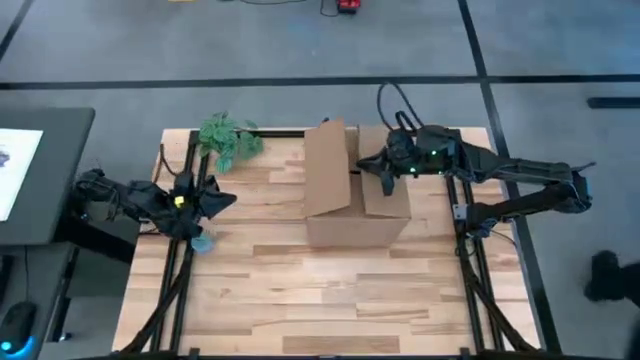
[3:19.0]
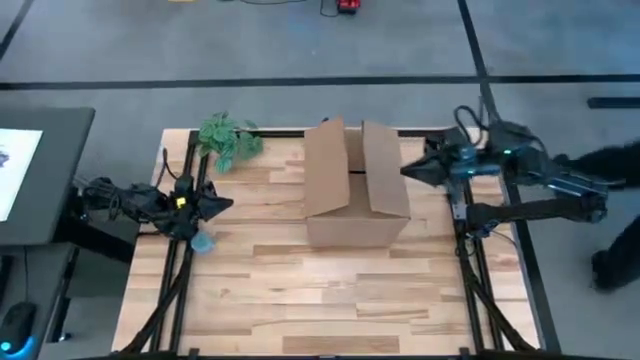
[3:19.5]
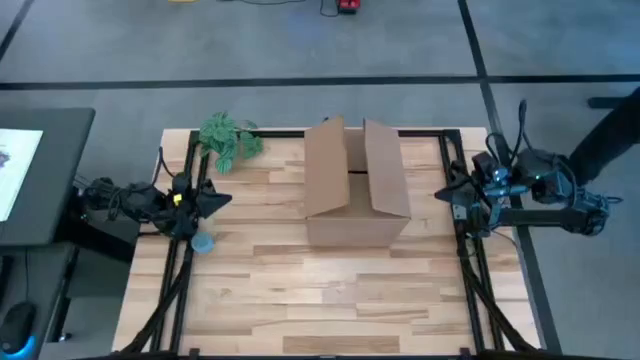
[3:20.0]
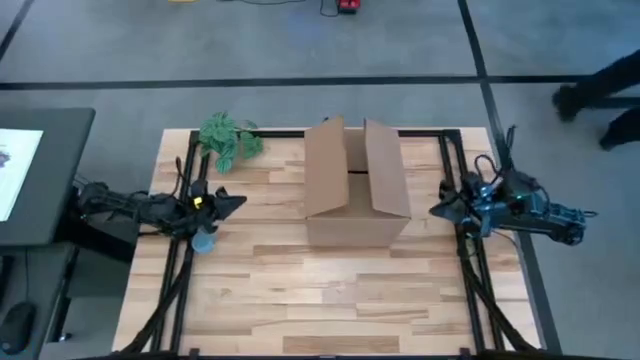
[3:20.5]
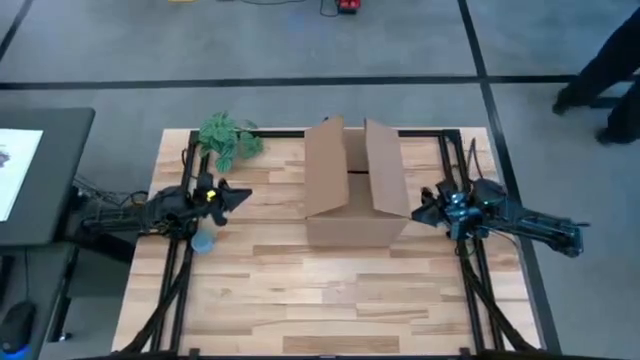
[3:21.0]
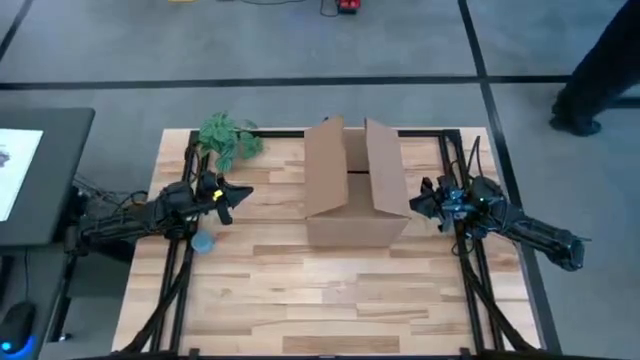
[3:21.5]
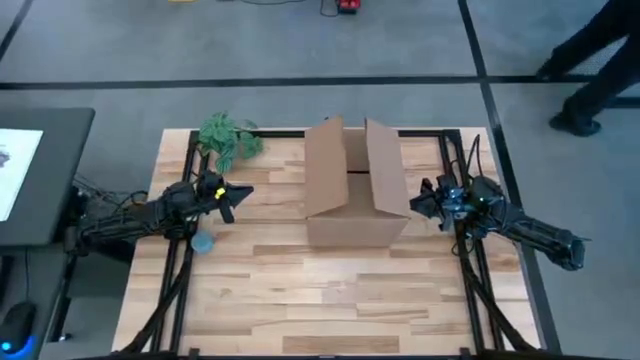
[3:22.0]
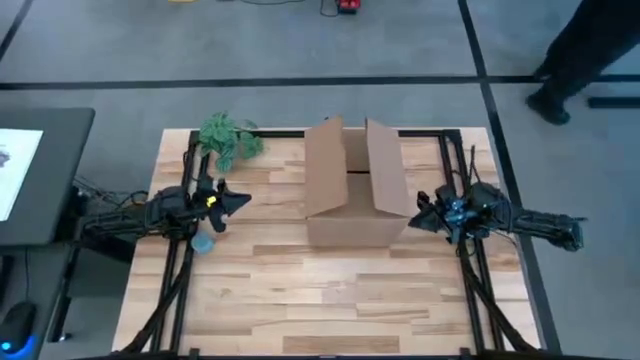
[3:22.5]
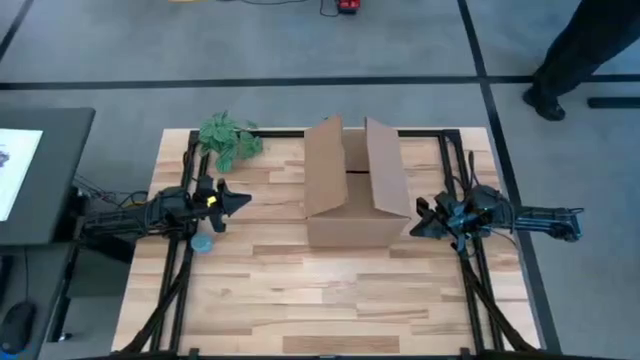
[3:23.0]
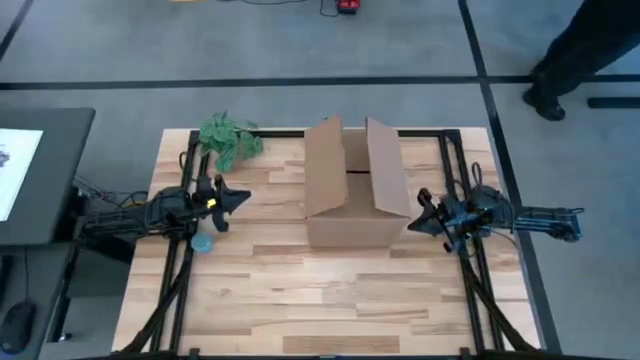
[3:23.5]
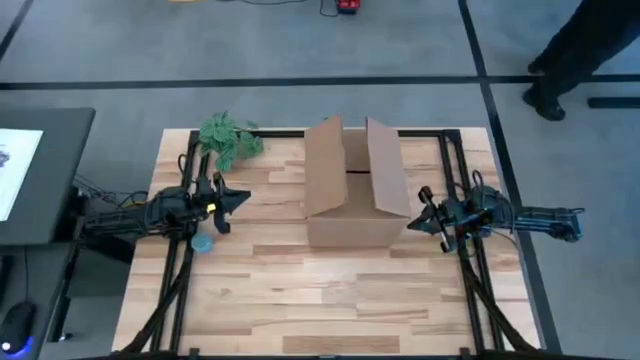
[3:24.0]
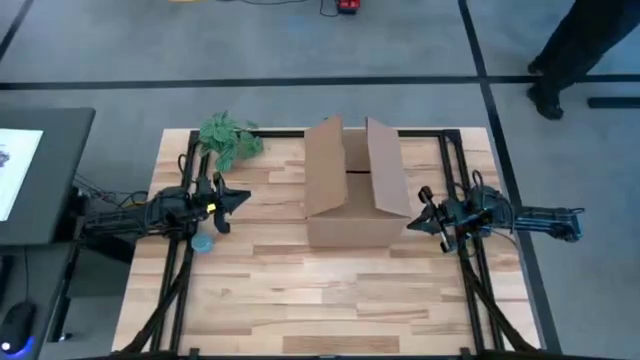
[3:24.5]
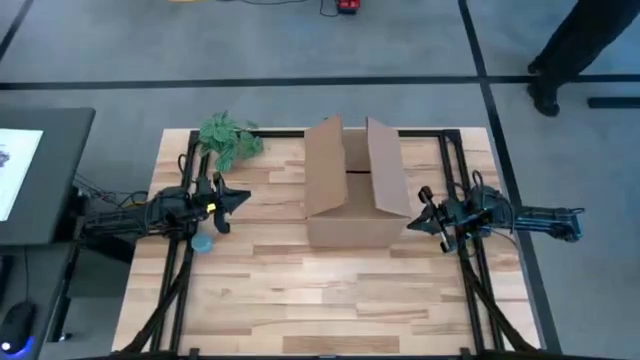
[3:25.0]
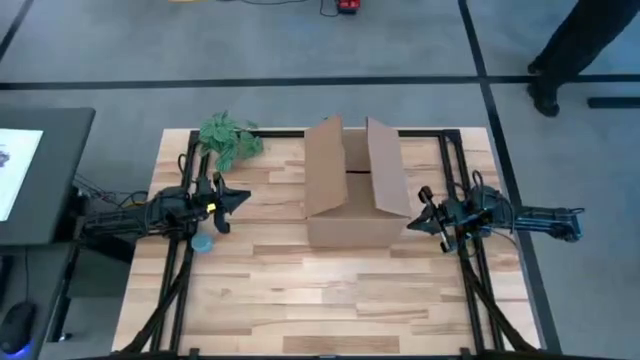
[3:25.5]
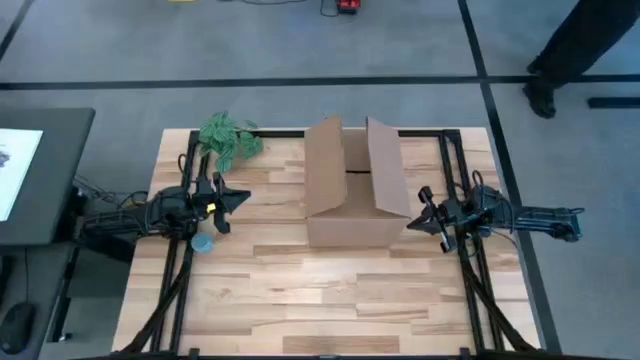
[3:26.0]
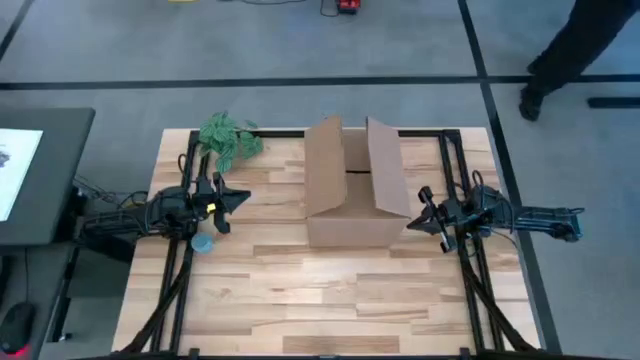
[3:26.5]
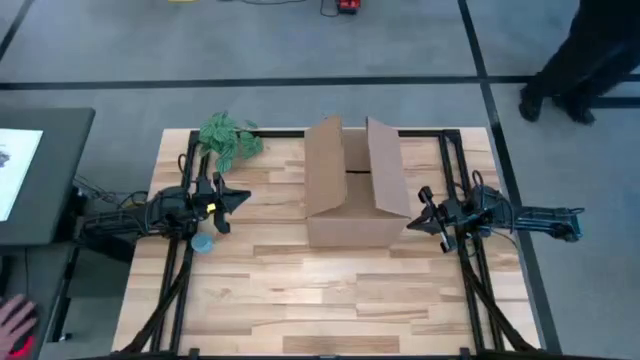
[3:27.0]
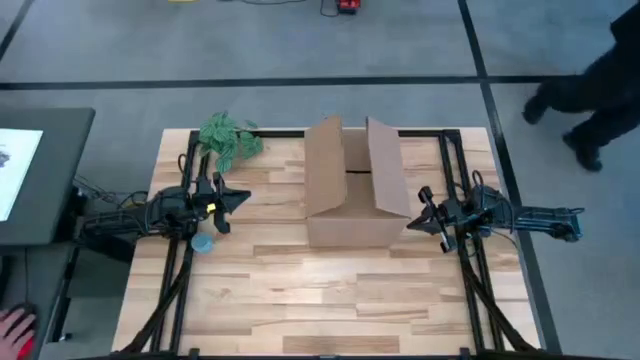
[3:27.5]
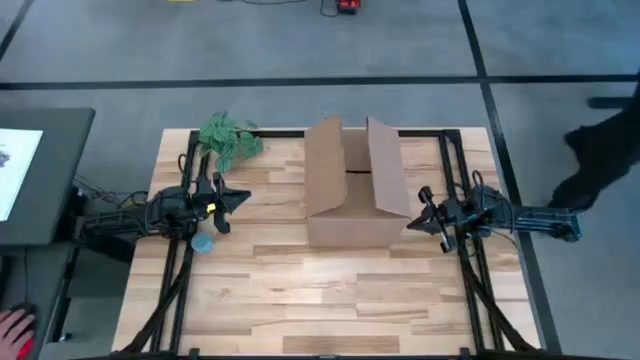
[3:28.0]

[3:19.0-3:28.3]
Task: wrap mug
Return to Home Position

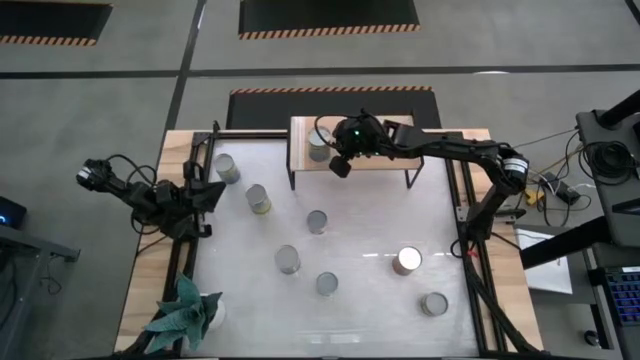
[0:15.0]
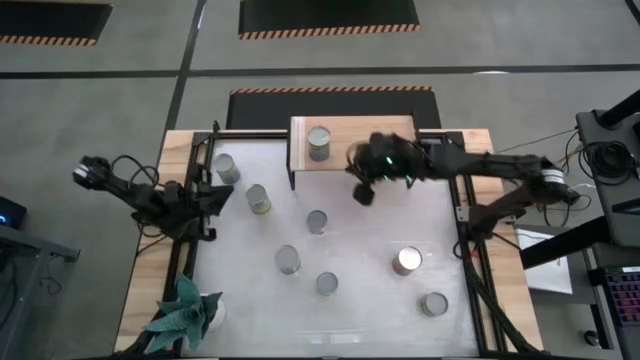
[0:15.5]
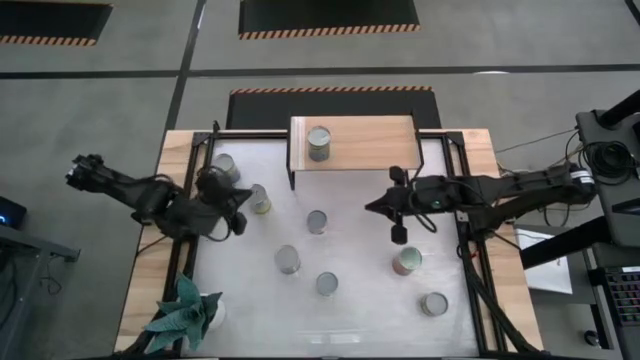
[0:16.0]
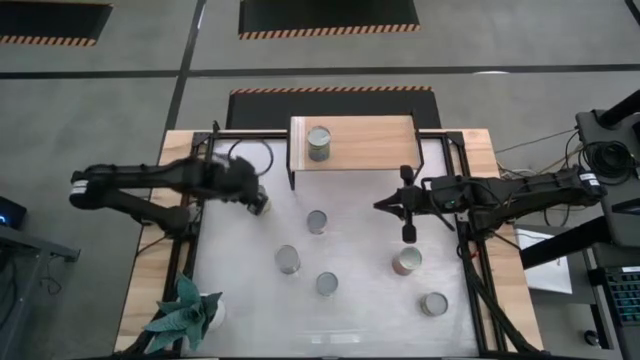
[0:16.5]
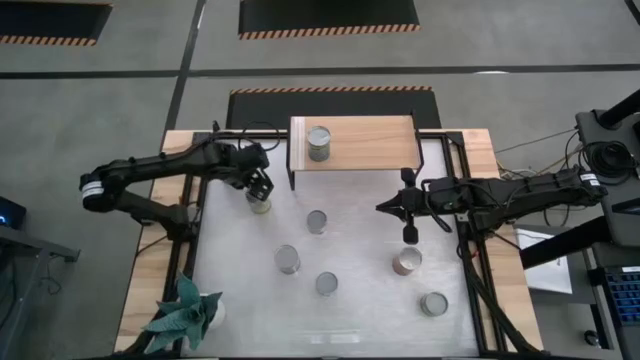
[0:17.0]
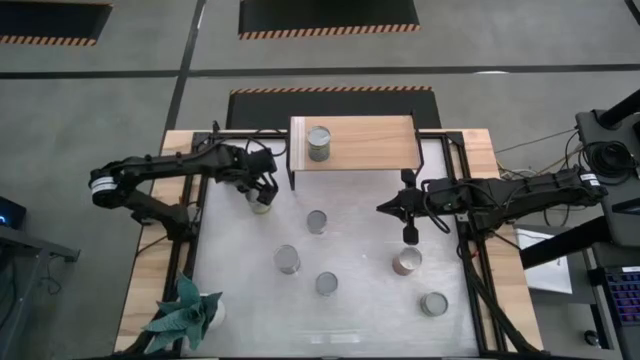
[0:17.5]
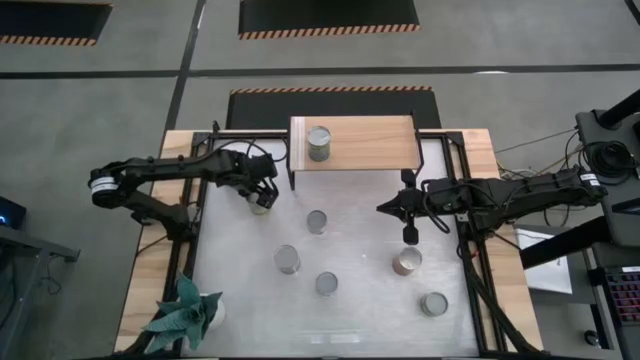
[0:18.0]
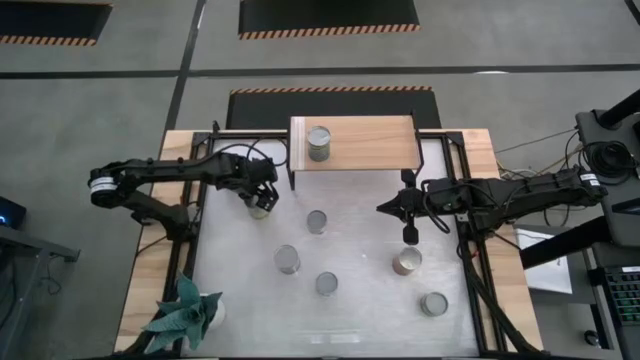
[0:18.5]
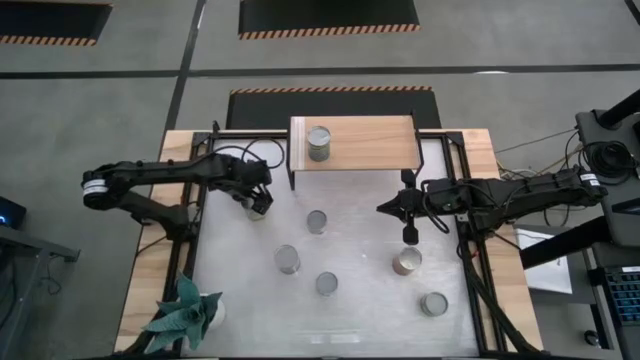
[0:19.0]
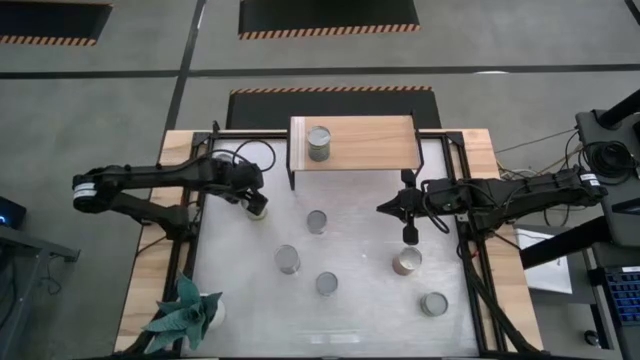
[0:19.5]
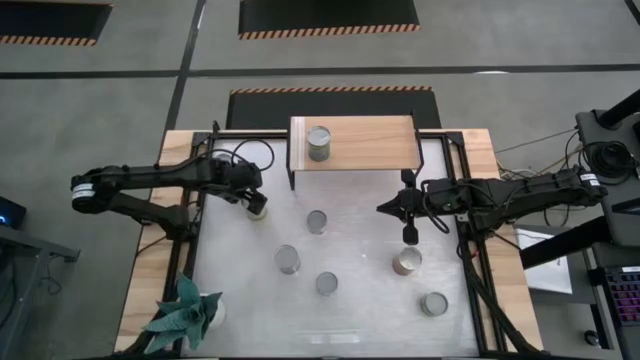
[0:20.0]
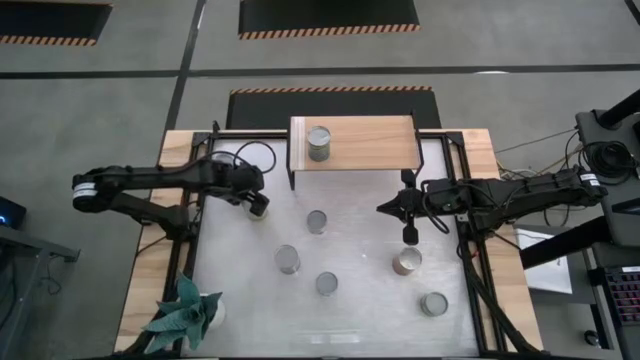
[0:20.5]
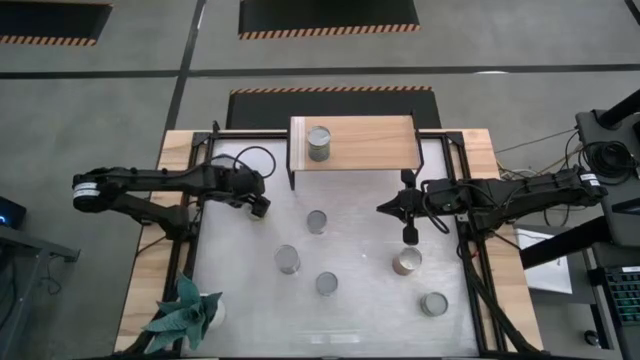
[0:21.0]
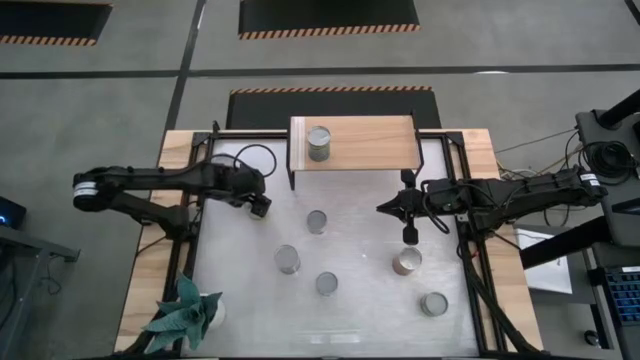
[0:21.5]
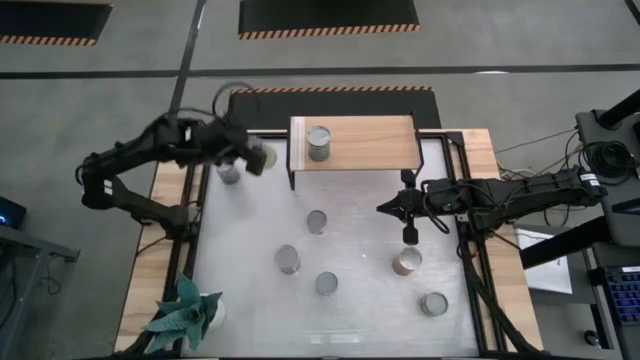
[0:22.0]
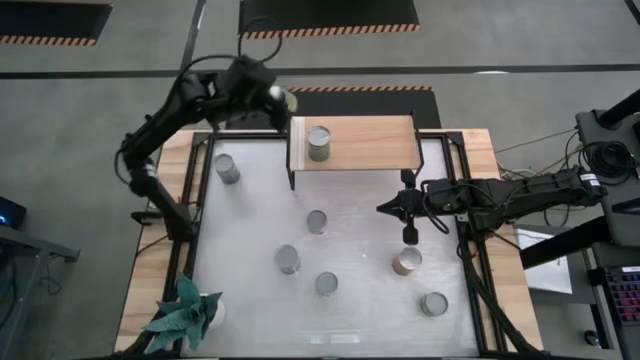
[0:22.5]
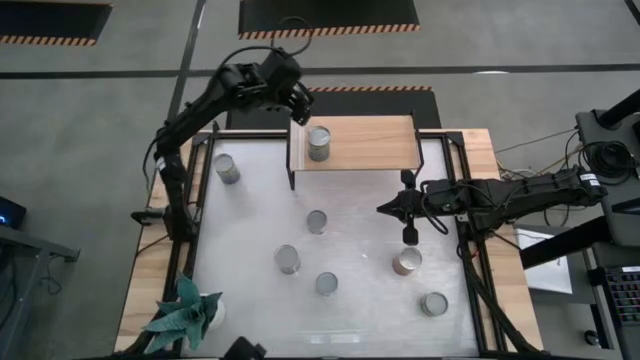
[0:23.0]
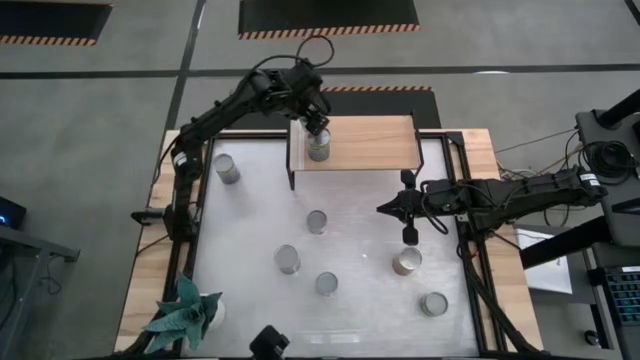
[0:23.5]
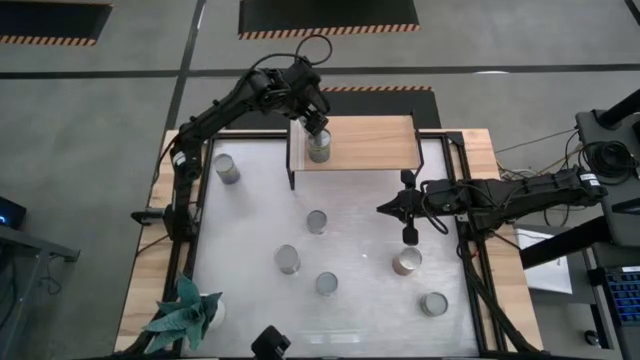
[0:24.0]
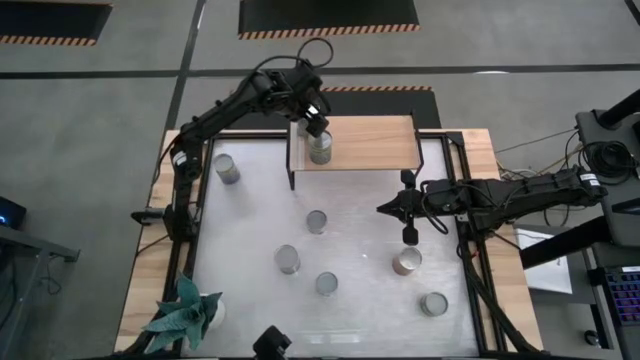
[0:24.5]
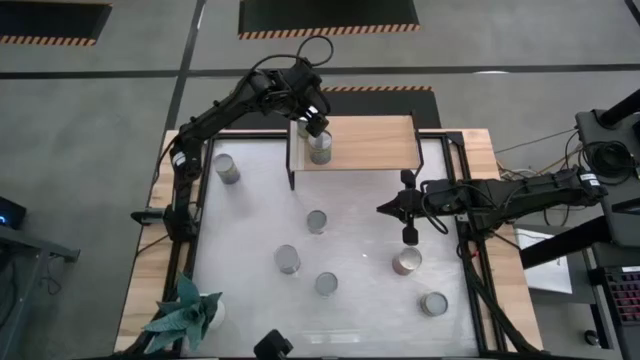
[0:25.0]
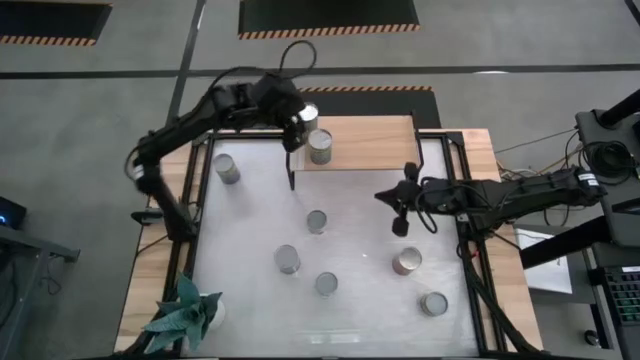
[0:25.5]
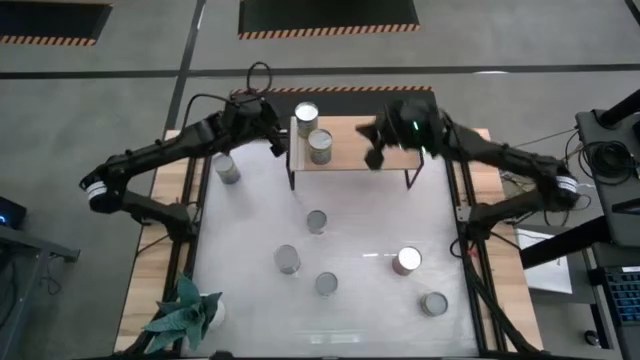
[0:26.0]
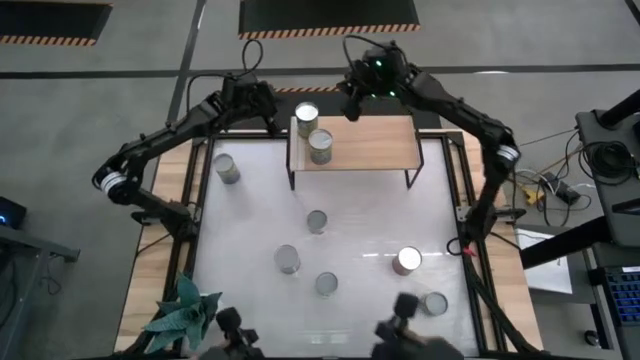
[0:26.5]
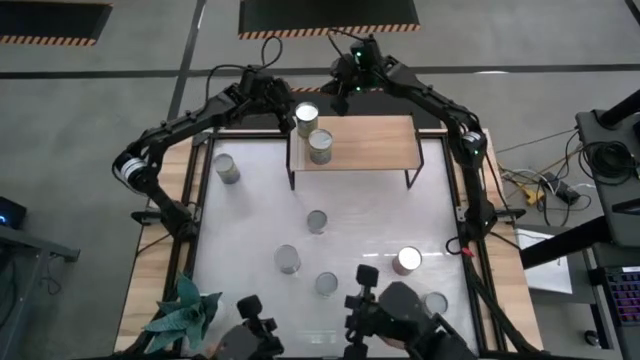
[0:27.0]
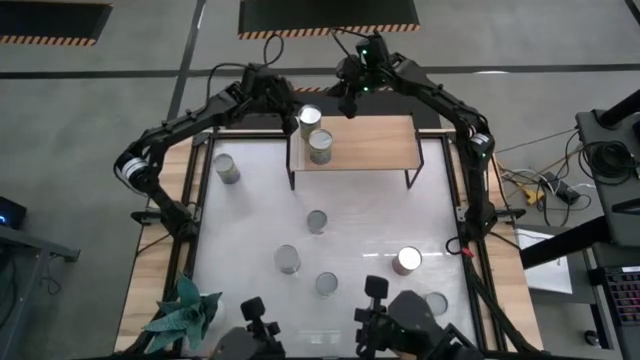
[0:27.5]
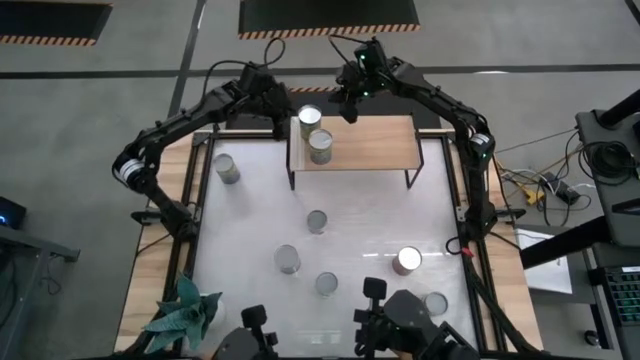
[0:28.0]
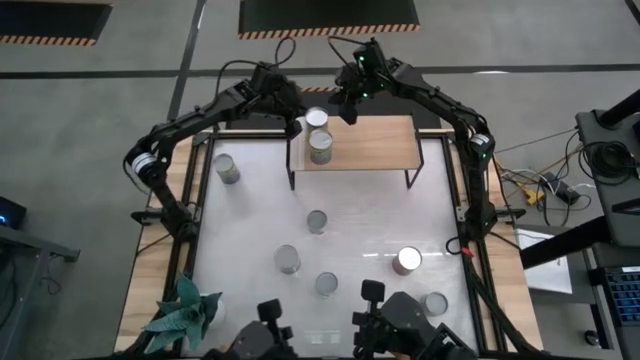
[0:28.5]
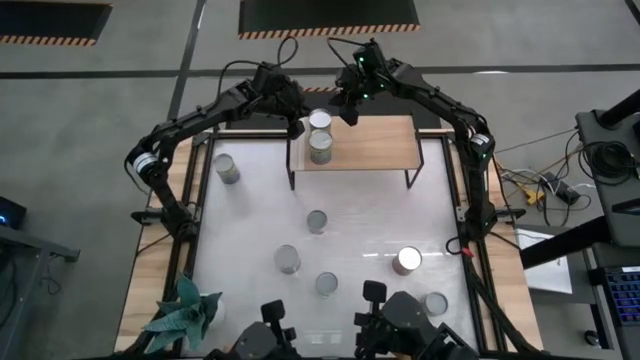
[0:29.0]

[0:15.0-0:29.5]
Task: Pick and place cans onto a shelf
Put the canned carrots on the shelf
